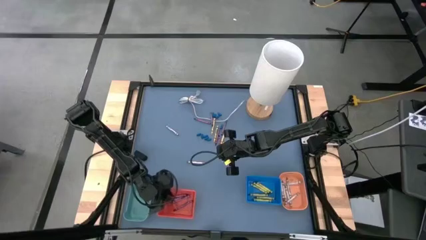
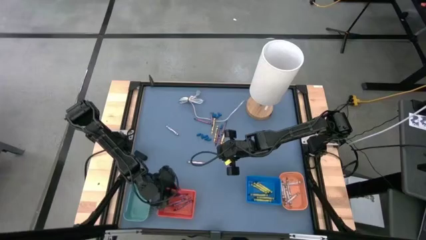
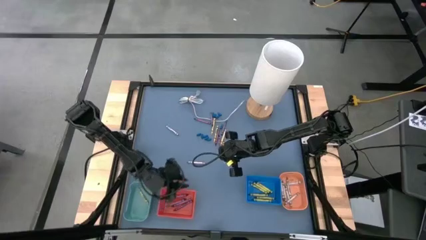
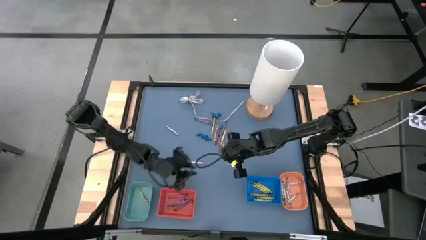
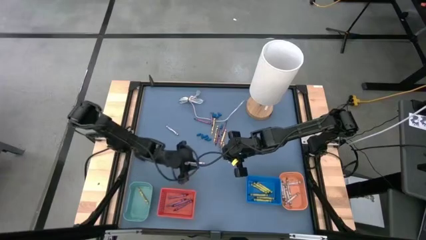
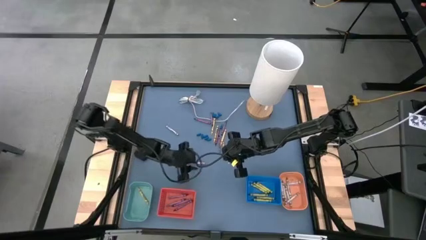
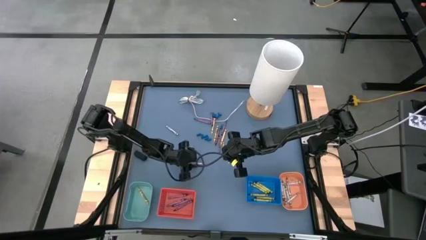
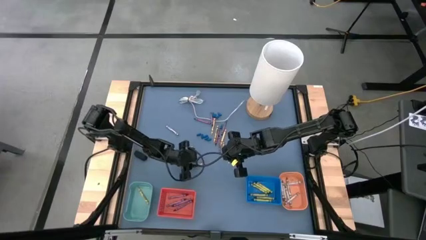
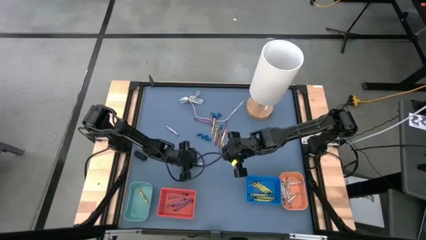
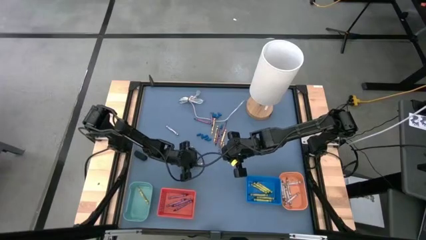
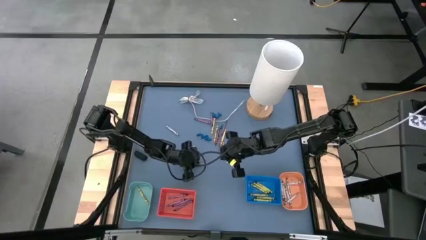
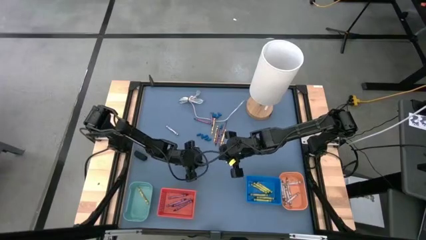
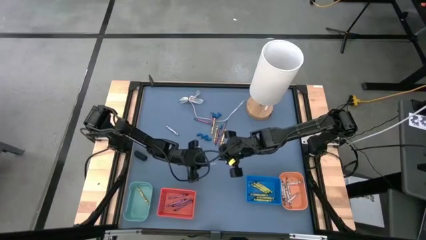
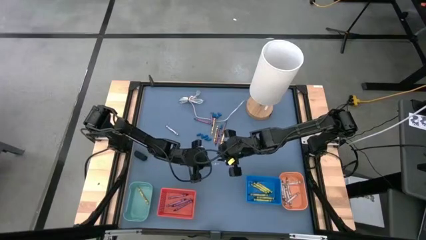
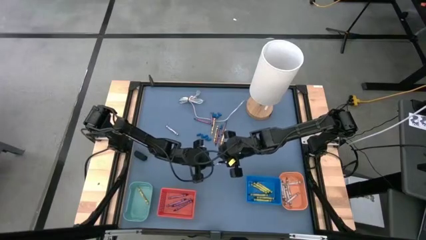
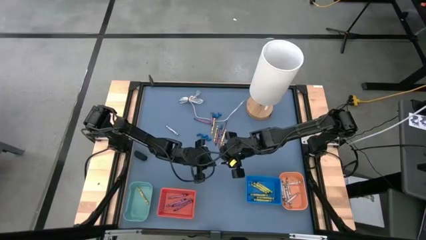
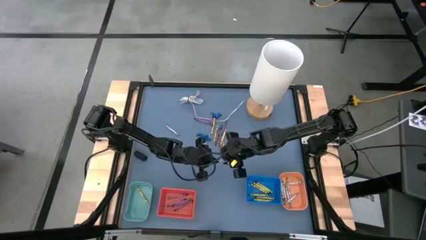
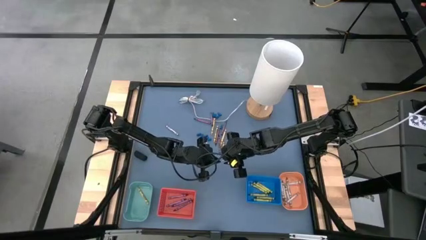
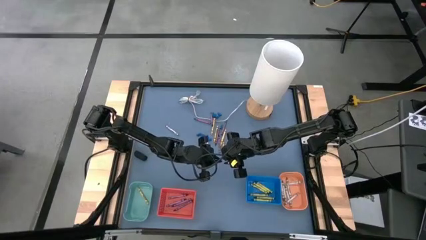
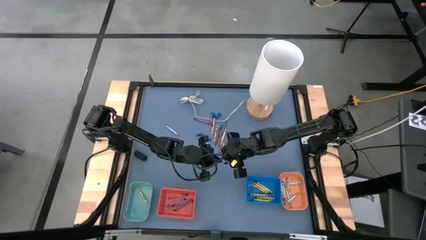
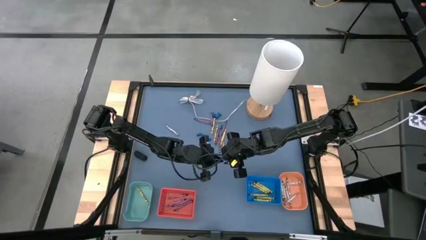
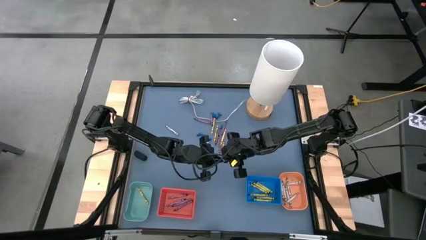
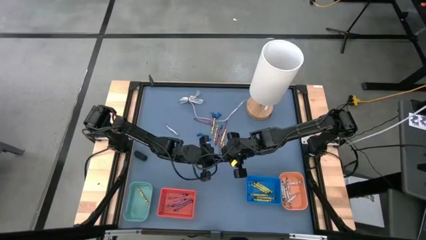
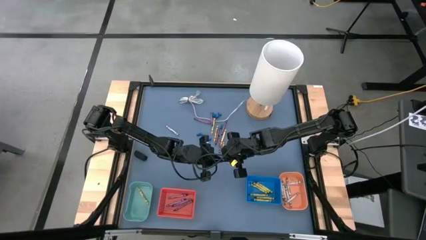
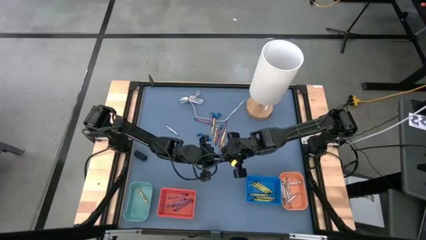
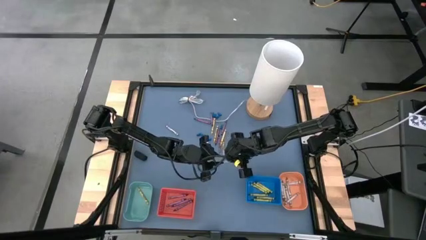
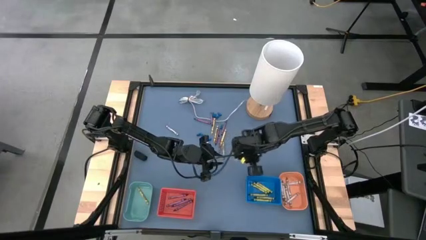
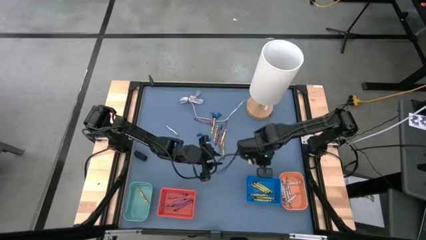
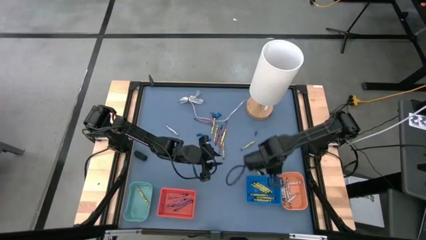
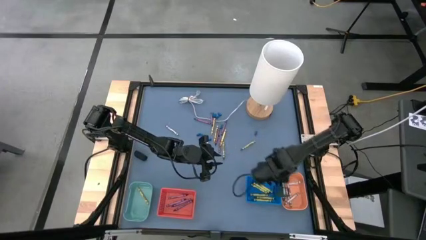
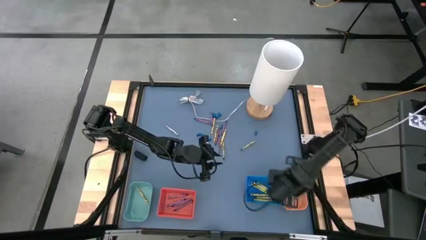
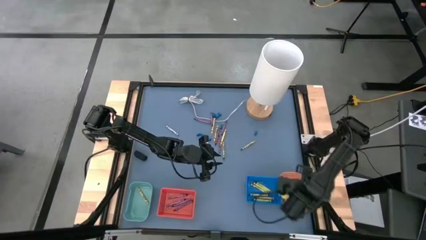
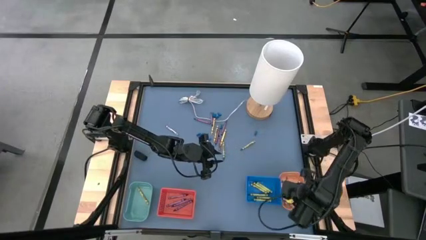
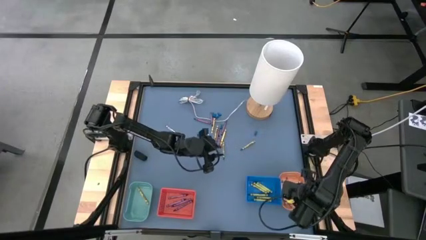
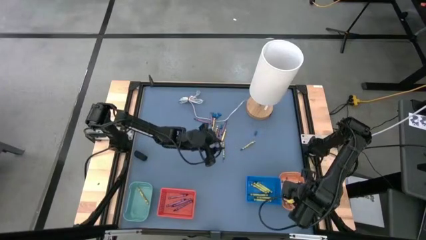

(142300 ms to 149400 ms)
Task: Sort crayons
Put the gray into the orange bin

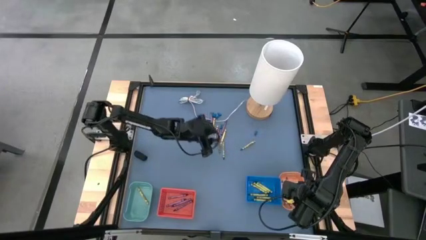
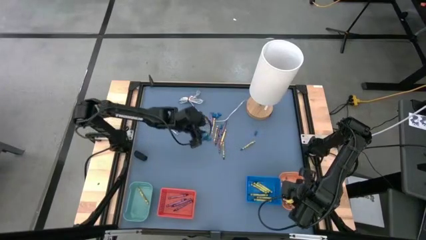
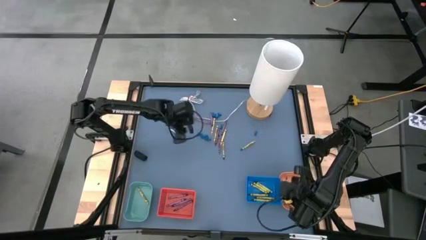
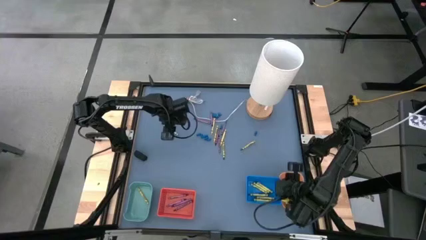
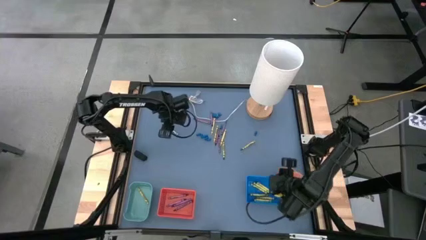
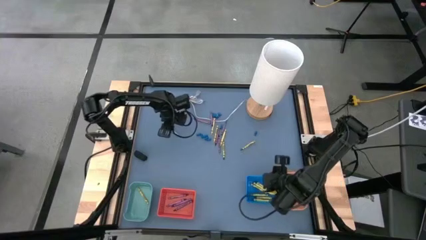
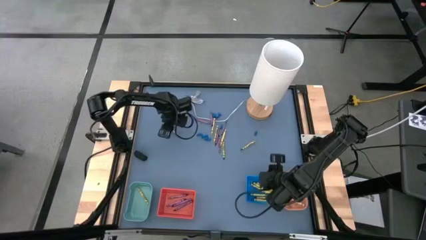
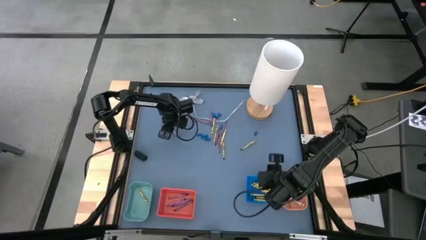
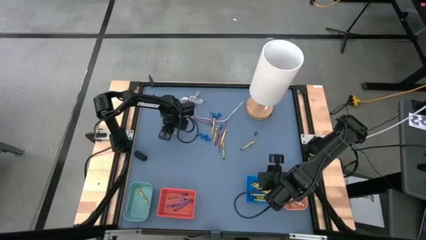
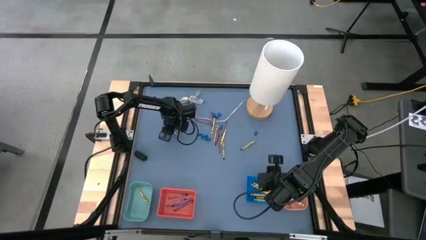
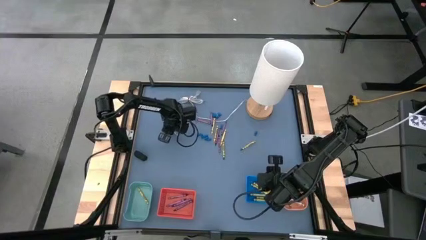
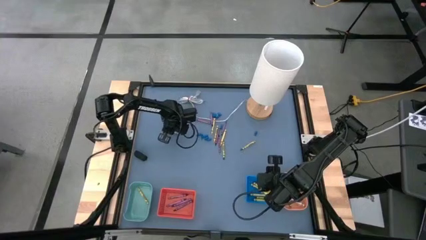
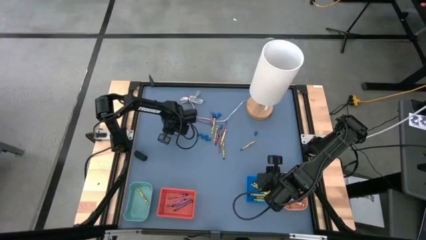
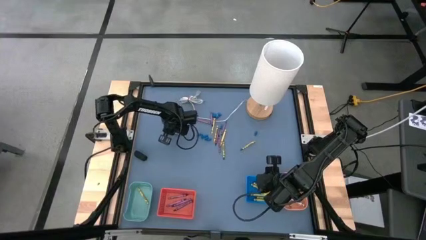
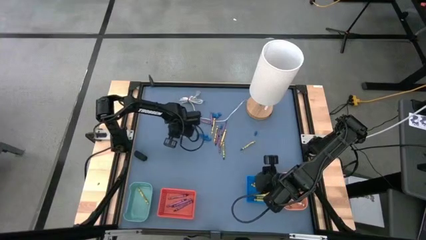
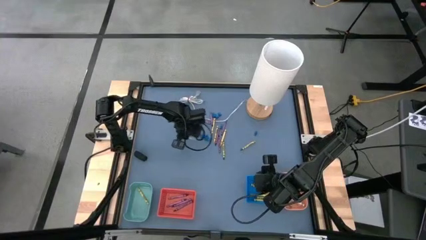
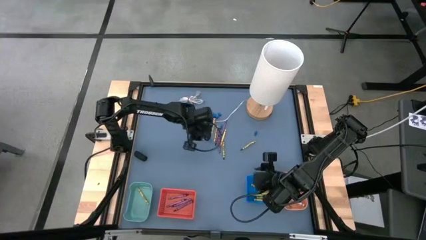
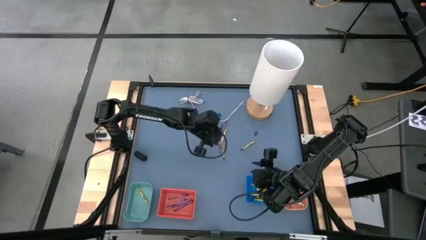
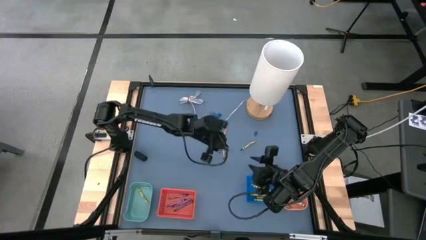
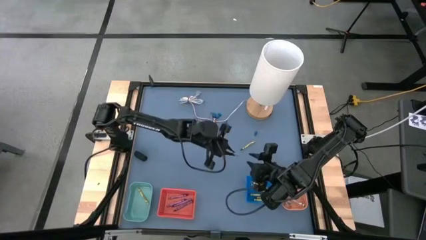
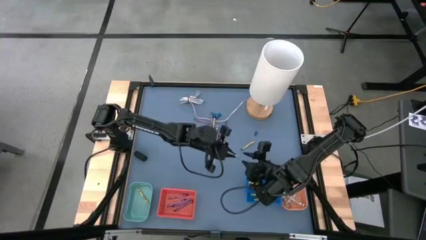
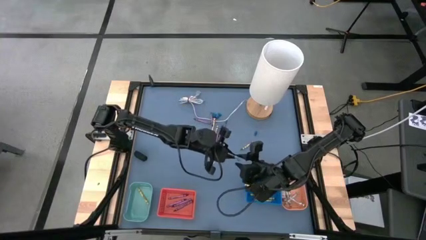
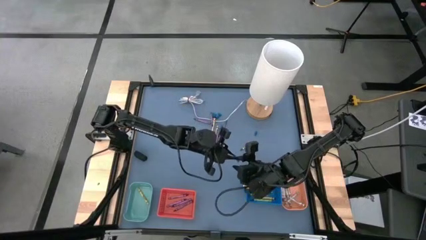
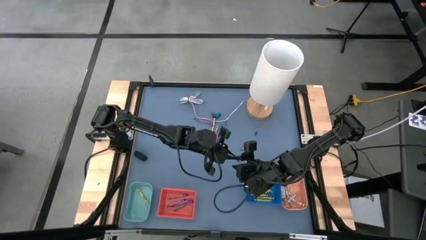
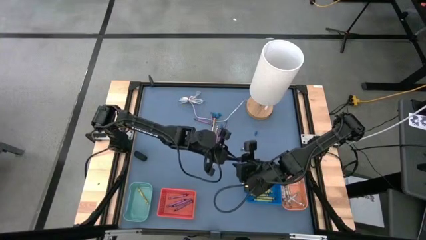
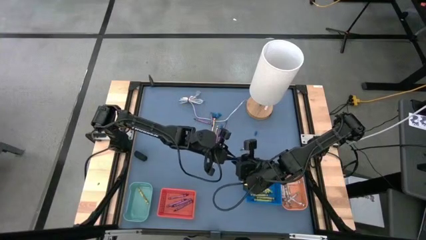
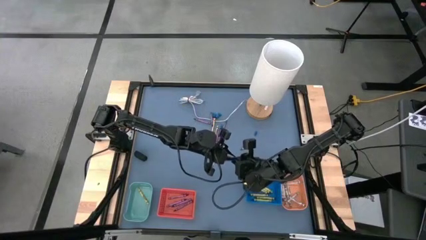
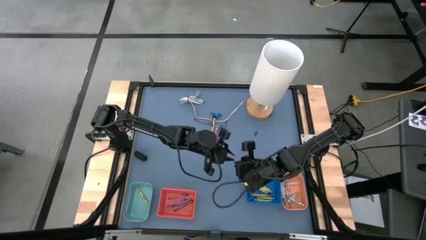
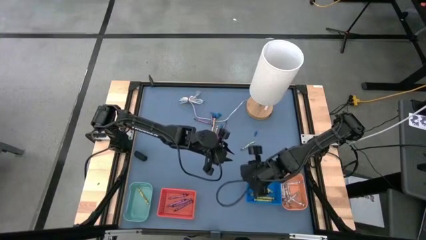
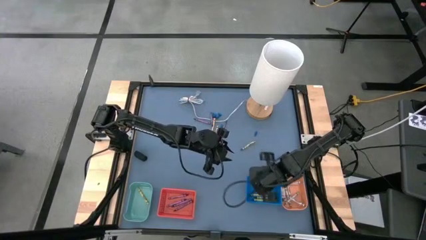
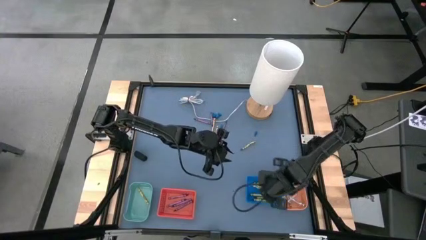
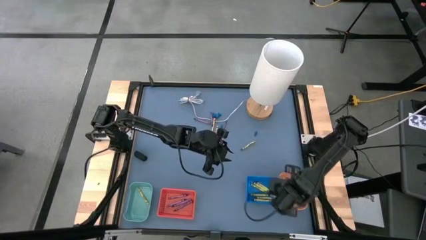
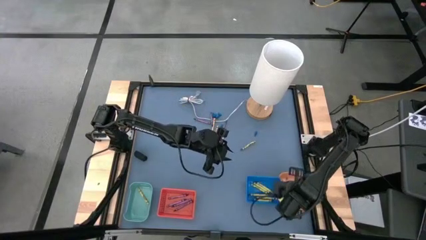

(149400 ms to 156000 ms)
Put the gray crayon into the orange bin

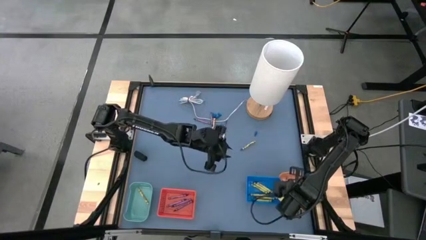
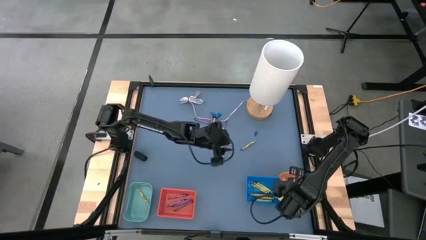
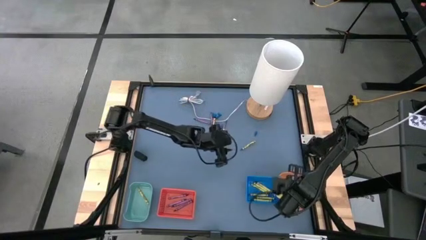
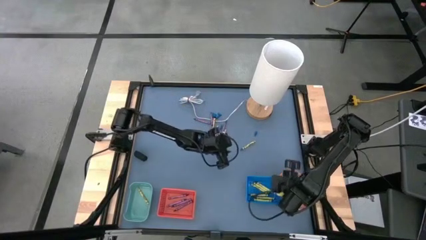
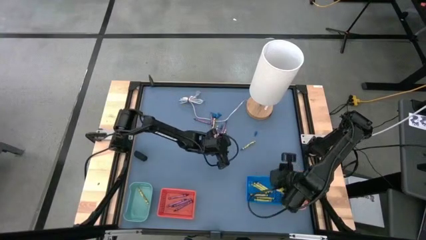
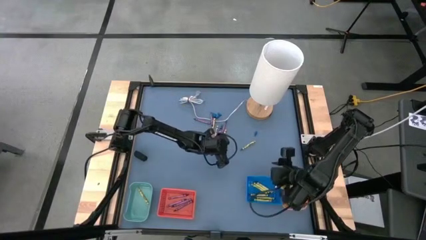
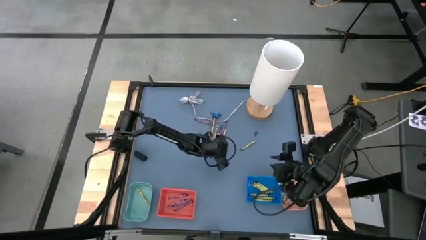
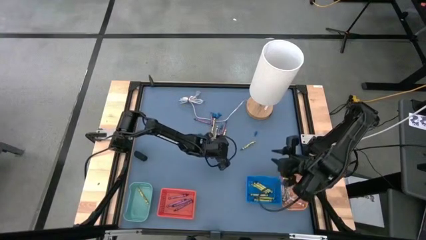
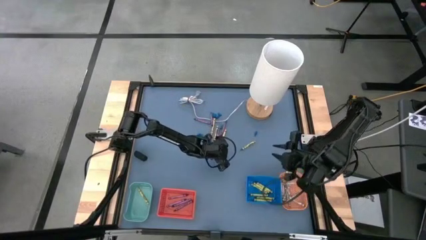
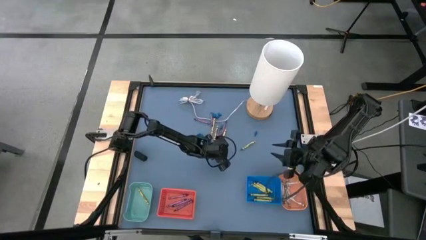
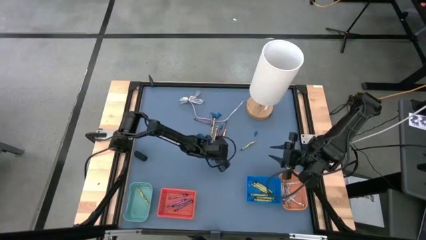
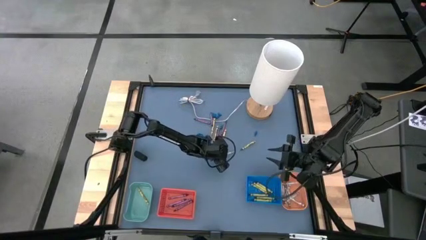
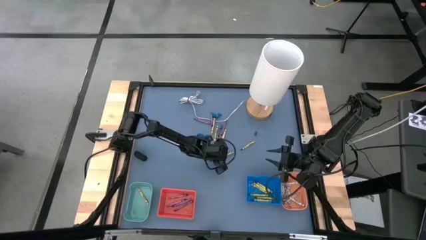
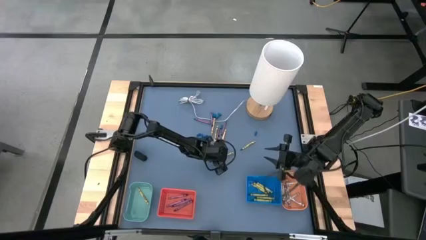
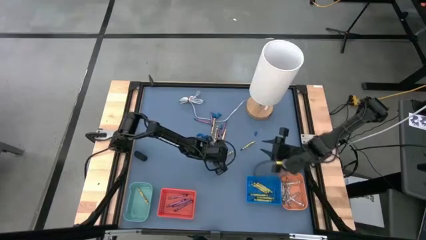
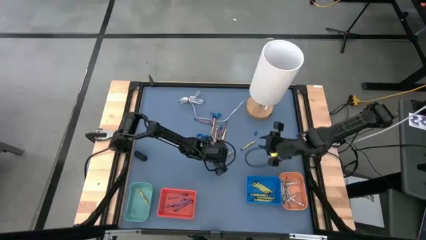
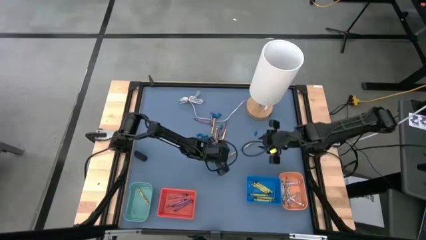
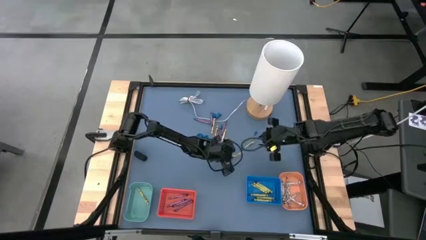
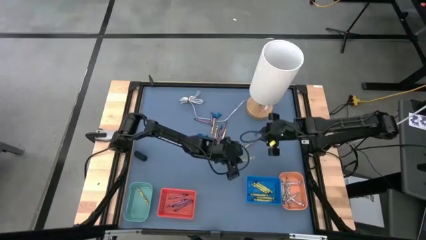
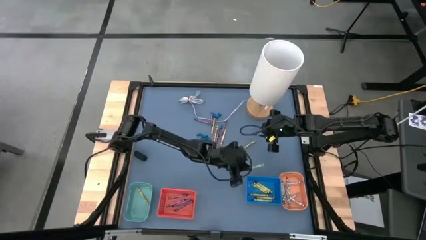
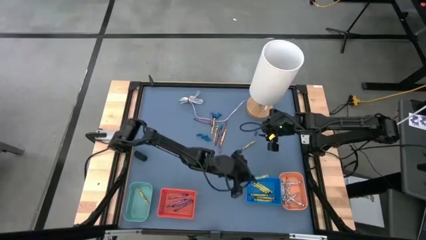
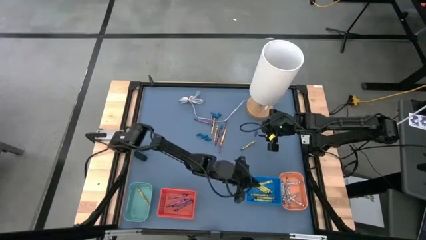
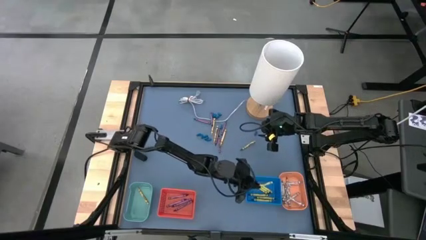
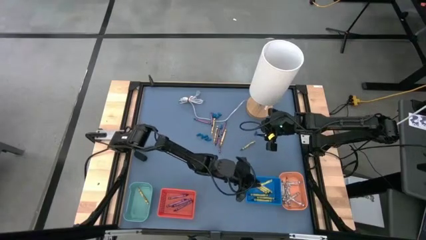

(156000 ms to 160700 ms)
Put the green crayon into the blue basket
